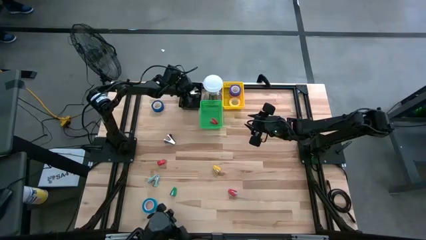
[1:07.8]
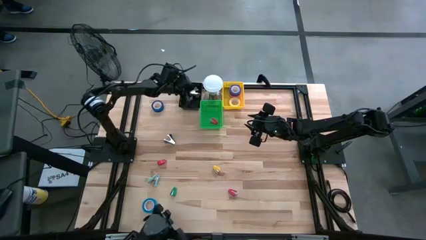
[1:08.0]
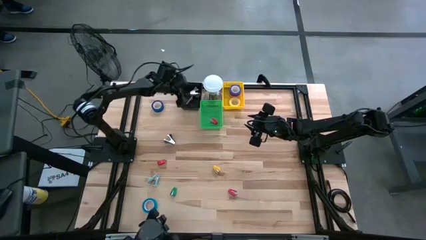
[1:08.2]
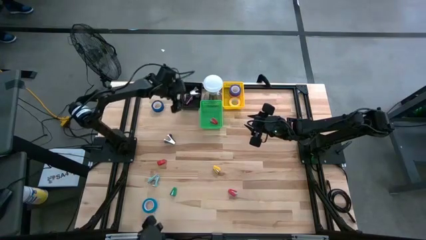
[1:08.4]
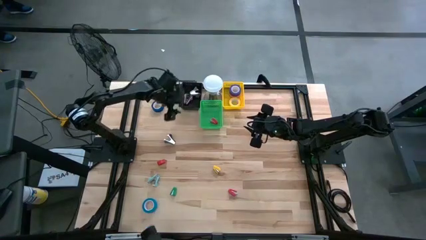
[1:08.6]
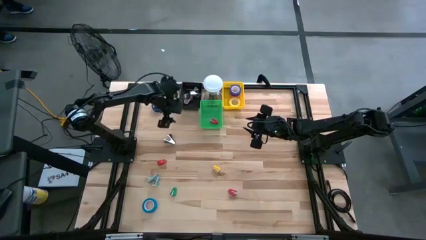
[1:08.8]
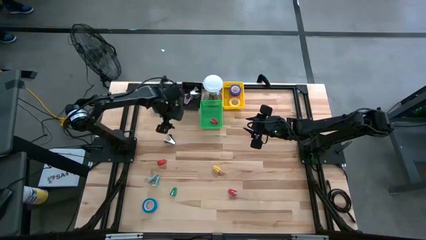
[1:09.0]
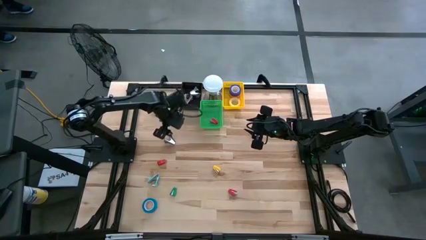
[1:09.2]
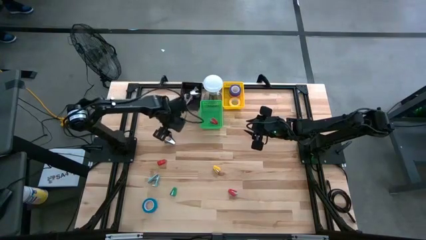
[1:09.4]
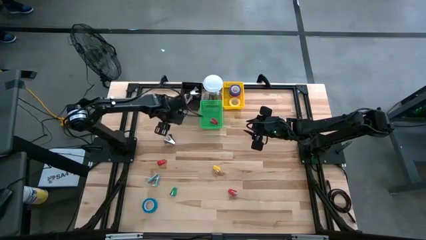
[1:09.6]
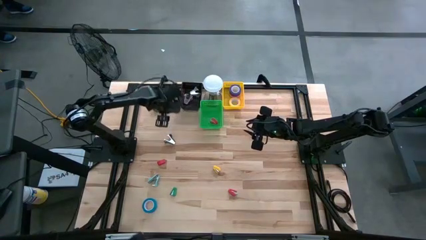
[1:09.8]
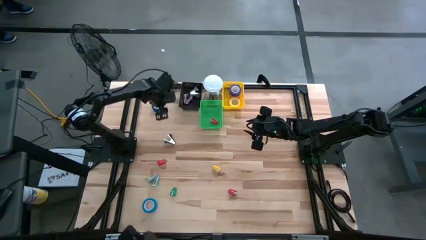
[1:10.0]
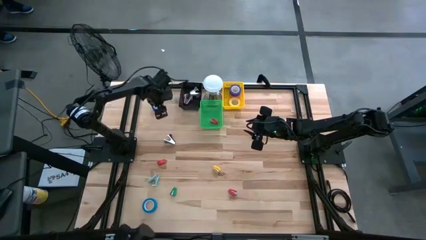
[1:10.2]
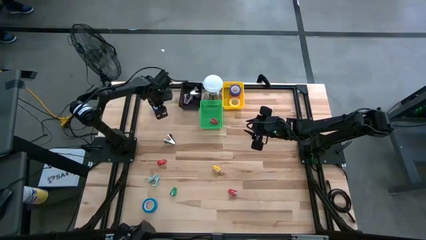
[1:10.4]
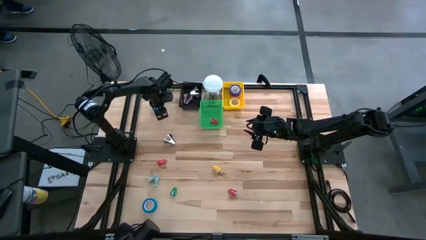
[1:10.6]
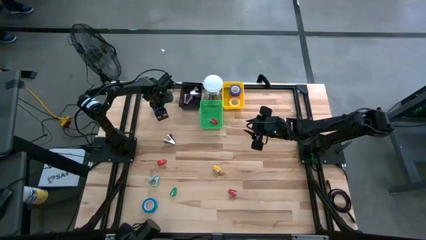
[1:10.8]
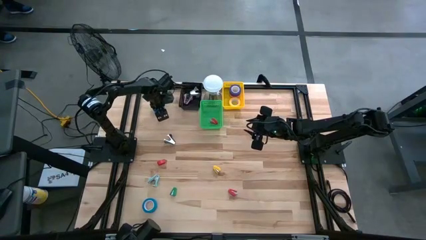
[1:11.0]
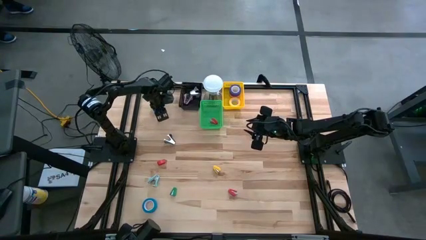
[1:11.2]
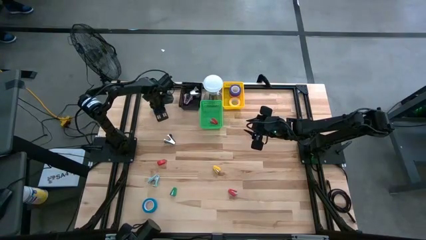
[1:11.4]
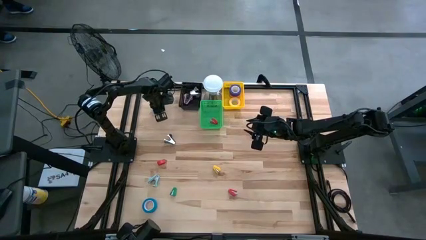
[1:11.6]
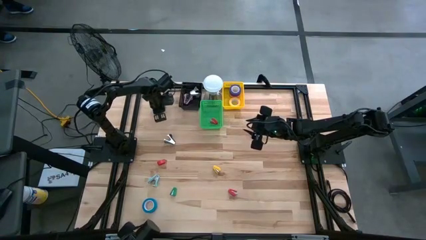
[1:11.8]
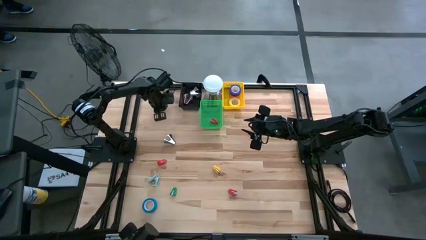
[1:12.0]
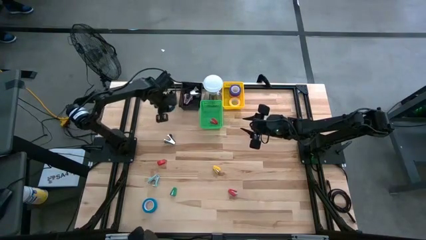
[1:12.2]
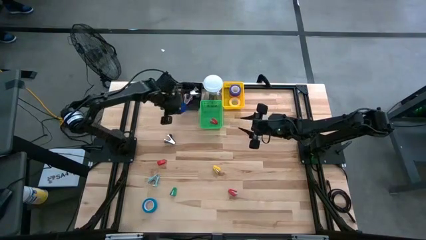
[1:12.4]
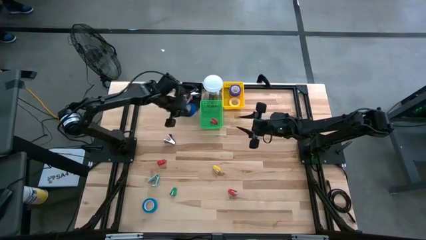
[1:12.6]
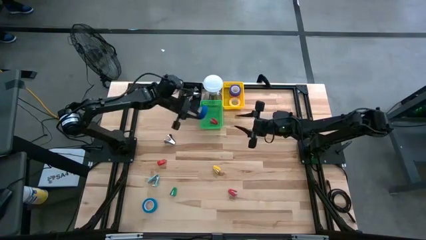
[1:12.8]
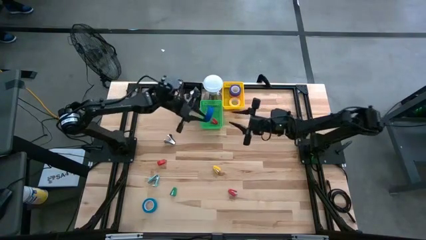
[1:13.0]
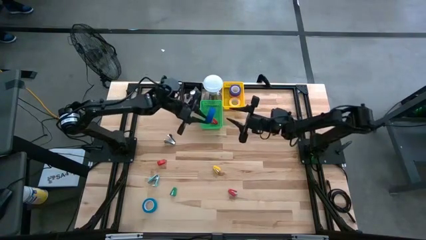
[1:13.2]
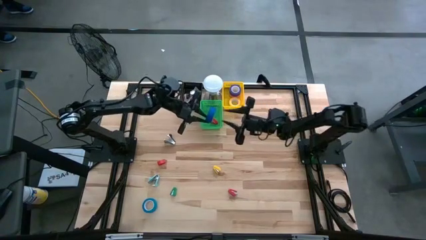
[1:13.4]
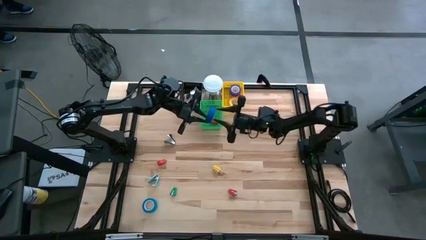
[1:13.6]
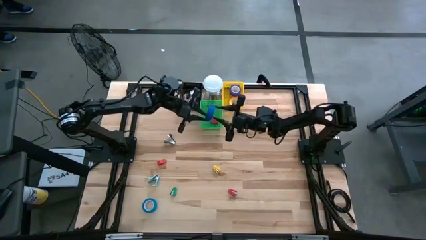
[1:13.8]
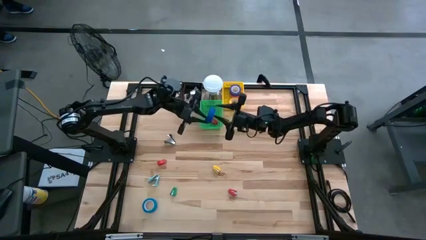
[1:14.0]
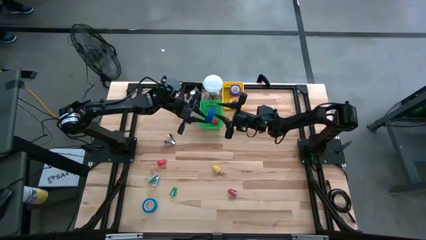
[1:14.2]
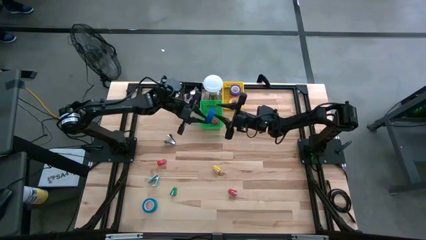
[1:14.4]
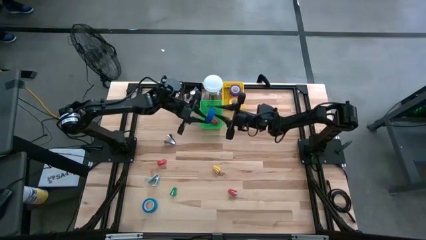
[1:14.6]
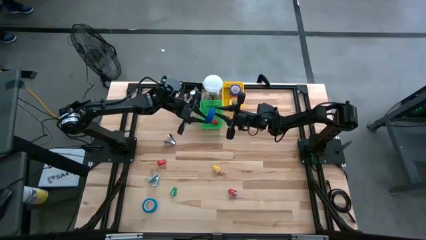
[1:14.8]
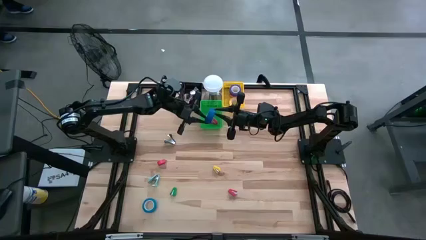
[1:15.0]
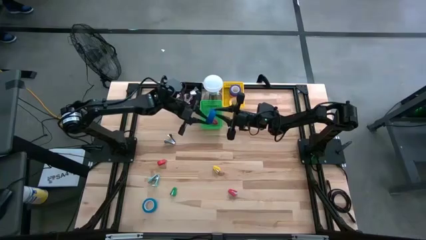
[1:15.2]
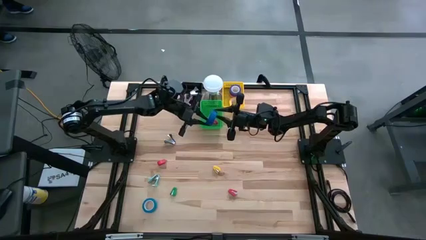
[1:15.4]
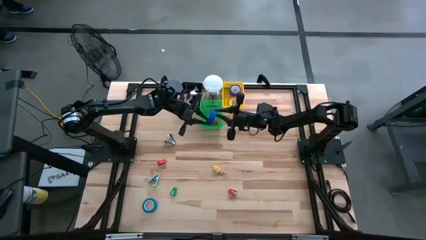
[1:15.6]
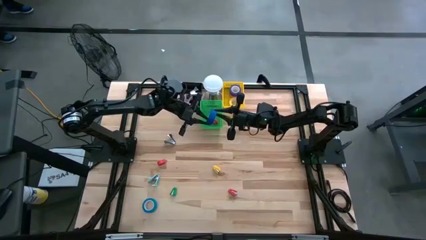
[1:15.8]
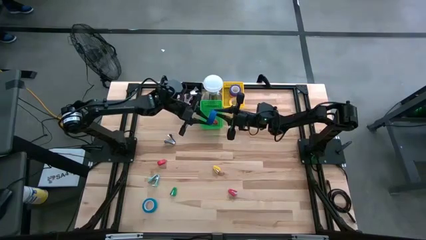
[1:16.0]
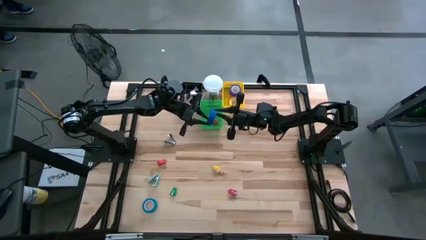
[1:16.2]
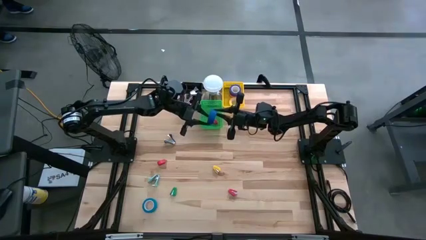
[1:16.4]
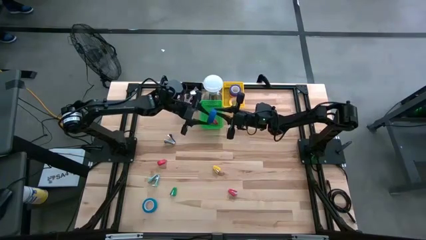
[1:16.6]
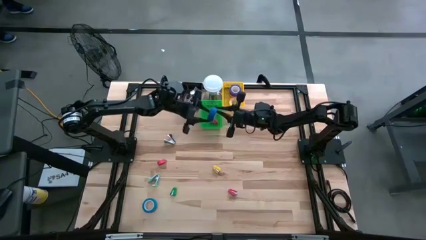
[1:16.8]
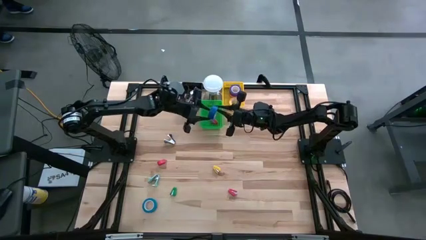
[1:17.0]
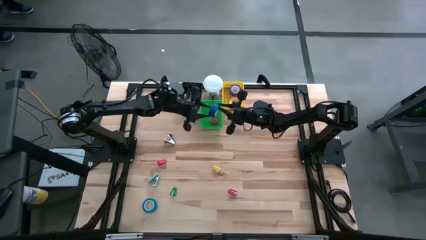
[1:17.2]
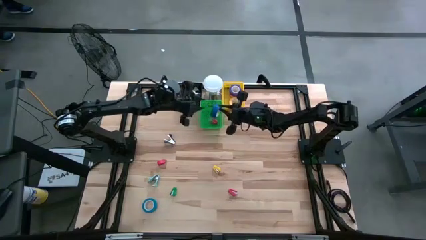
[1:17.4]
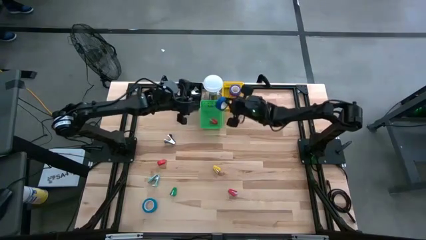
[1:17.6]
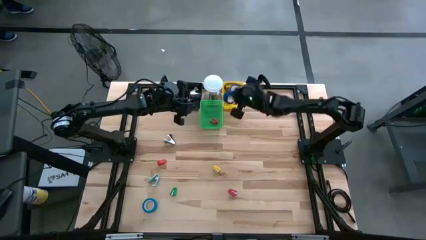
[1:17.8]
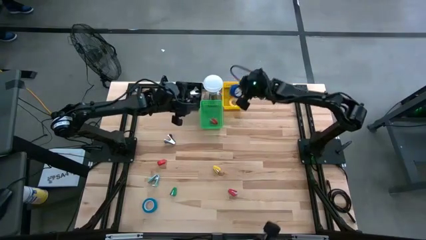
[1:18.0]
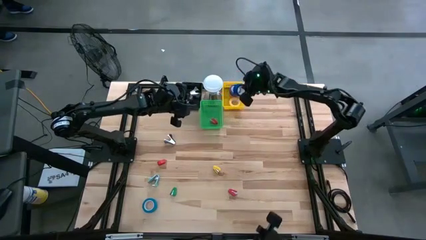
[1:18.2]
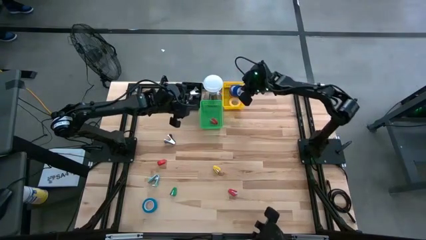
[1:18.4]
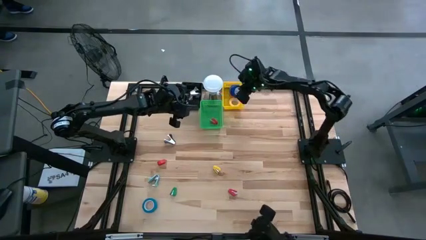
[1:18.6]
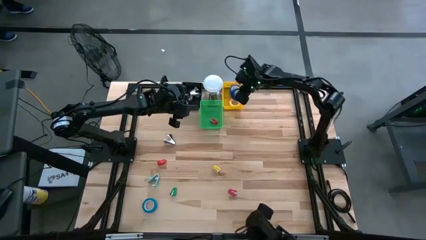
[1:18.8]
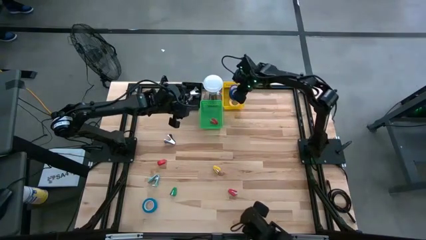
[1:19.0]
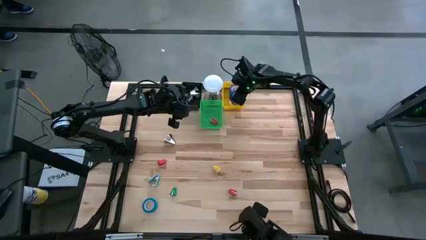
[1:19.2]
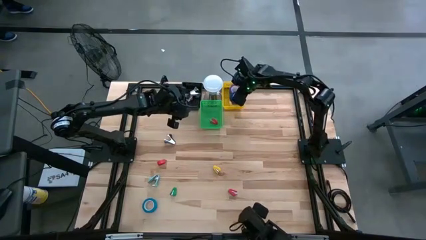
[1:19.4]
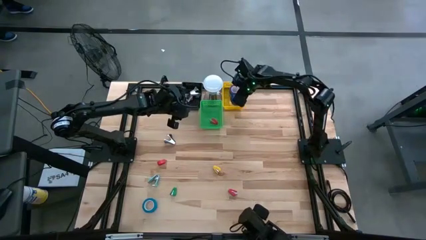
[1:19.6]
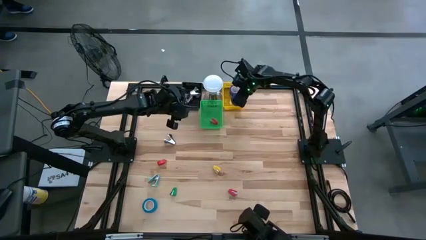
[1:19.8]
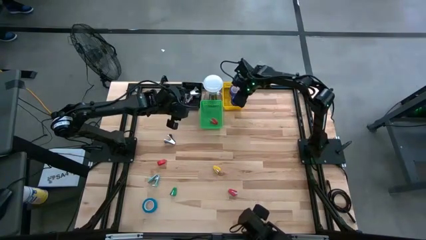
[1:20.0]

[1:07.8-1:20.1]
Task: Pick and place Stapler, Stapler remover, tape
Put the blue tape into the yellow bin

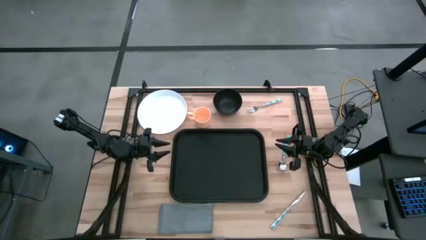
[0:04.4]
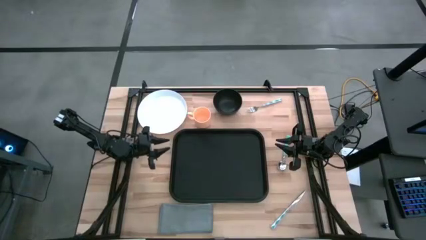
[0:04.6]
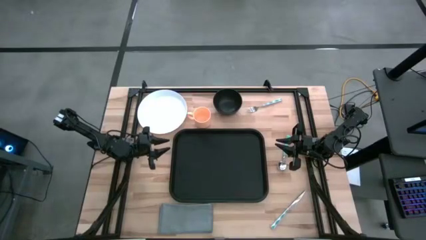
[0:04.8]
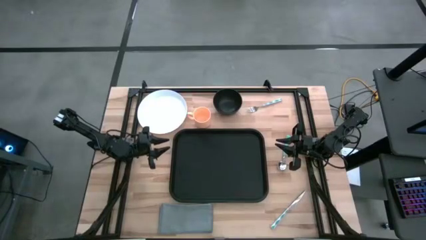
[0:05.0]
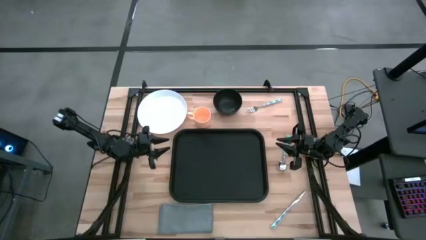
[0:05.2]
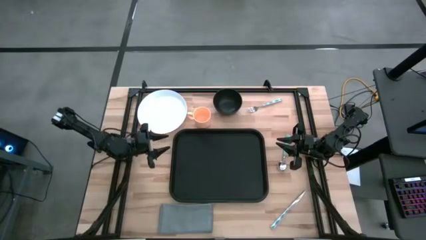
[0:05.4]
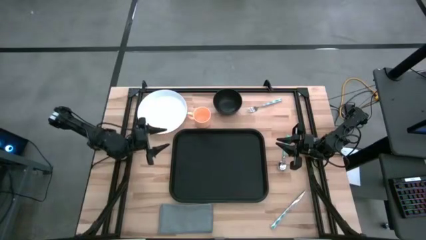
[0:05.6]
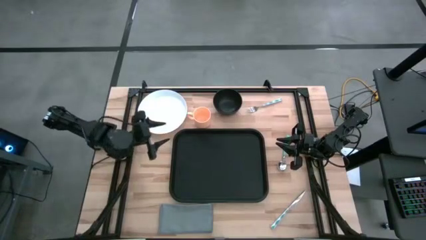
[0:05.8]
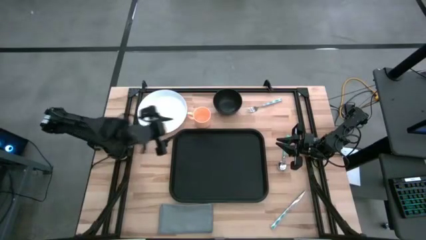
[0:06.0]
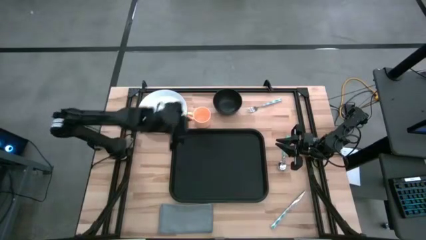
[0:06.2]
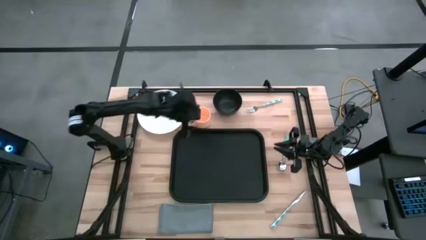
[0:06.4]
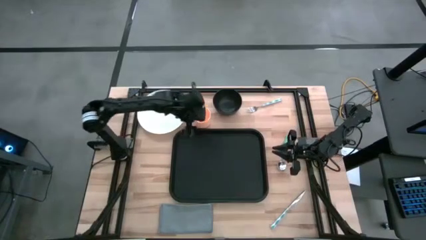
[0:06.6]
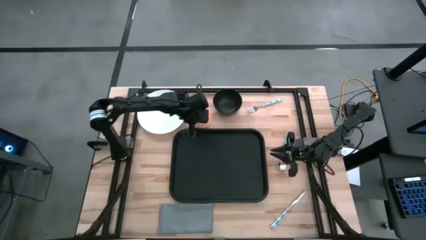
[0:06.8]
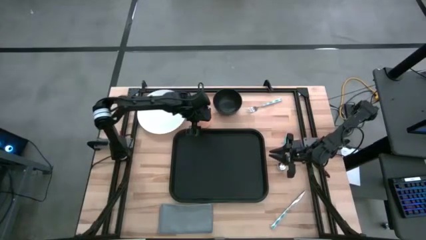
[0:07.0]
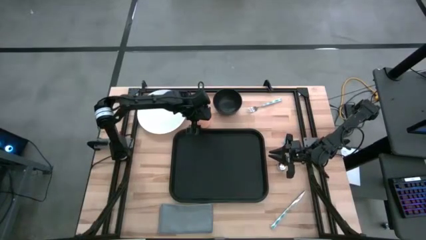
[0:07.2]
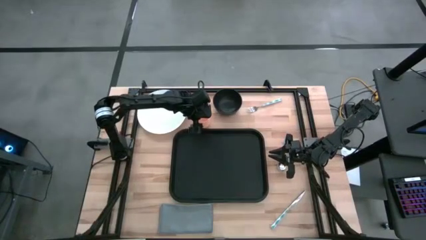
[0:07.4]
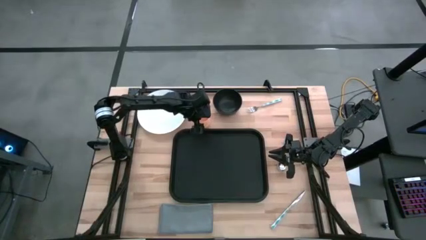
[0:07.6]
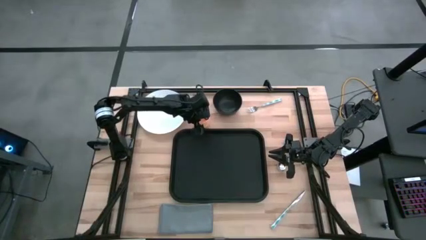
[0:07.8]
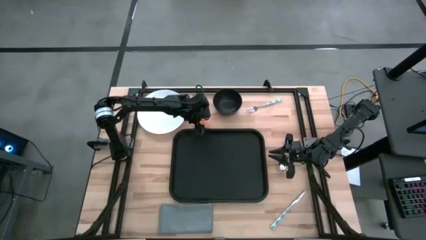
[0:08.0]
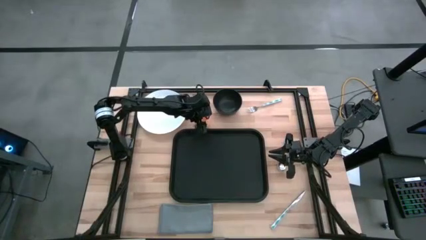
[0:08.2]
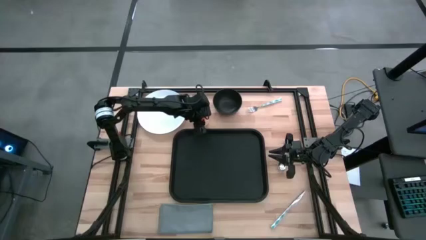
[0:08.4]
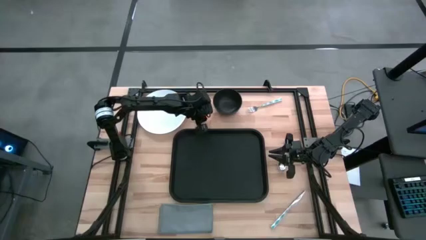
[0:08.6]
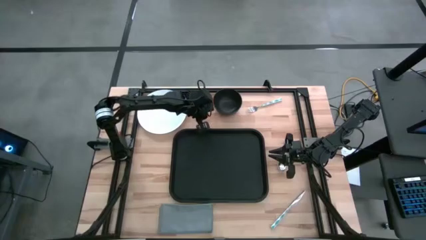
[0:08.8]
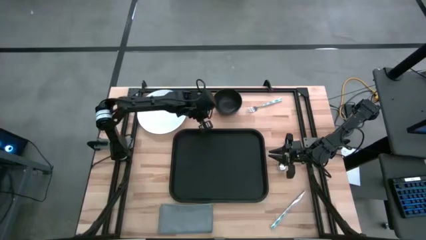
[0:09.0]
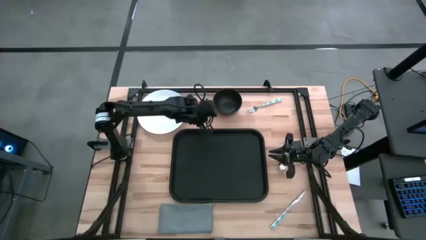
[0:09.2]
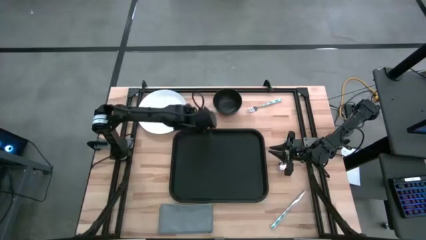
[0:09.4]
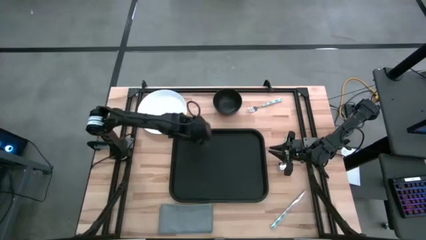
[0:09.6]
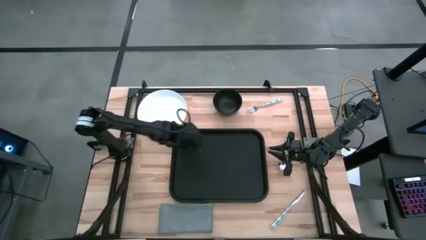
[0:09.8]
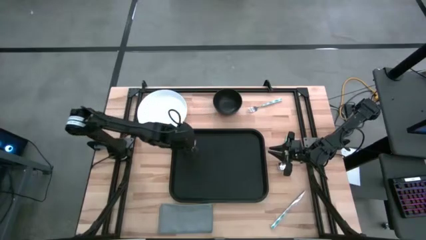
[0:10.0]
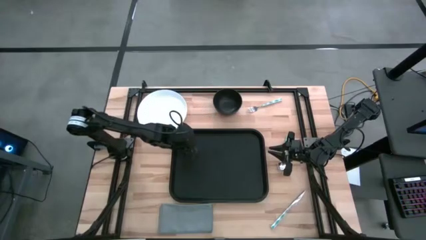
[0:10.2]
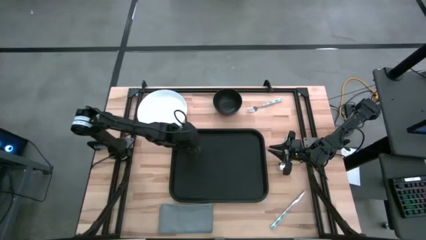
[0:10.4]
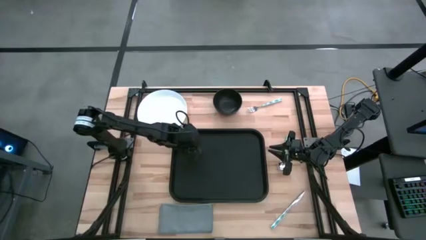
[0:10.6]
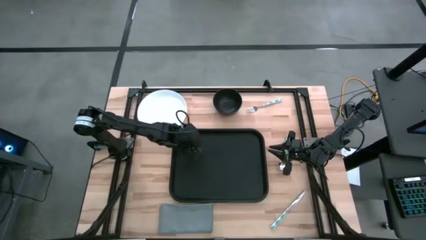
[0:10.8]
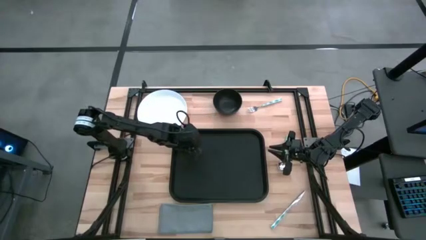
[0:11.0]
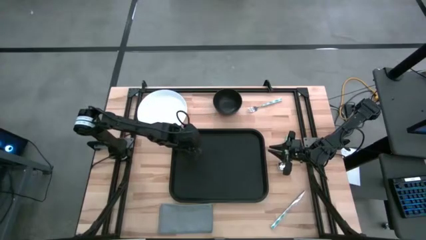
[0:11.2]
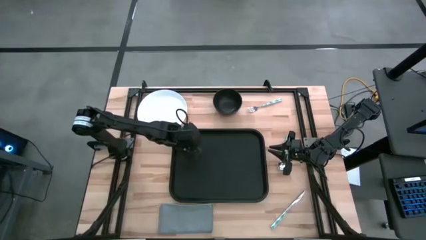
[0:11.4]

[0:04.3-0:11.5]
Task: Set up tray
Put the yellow cup on the top left of the black serving tray
